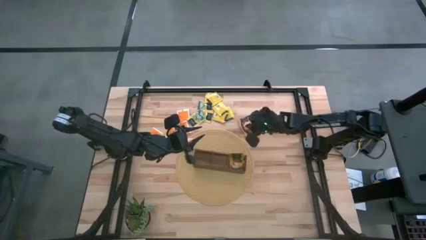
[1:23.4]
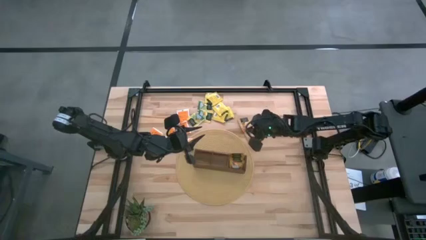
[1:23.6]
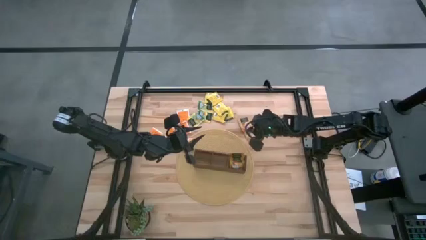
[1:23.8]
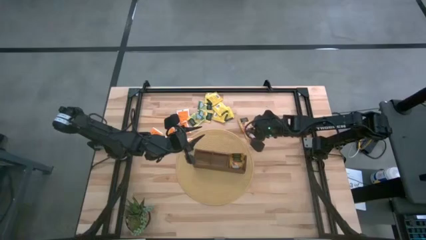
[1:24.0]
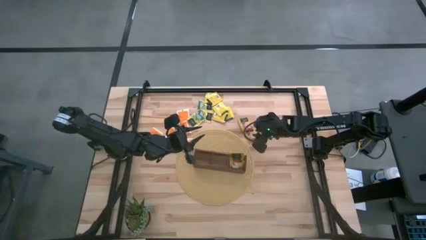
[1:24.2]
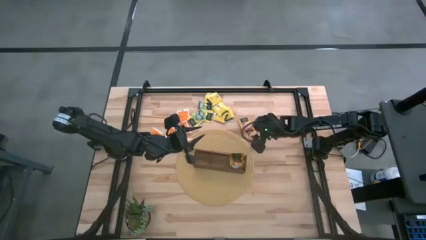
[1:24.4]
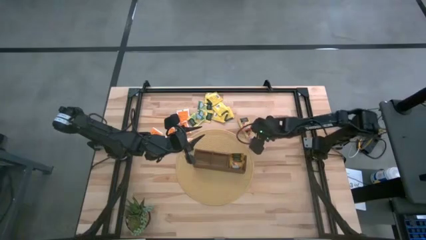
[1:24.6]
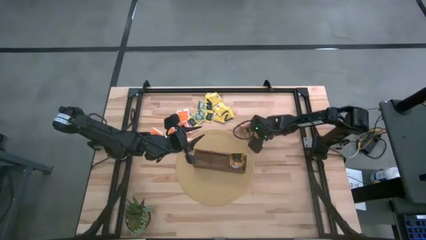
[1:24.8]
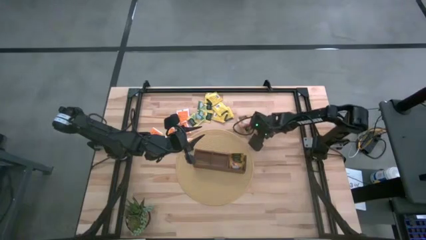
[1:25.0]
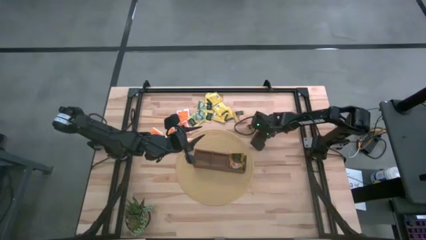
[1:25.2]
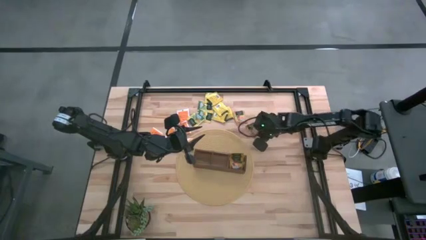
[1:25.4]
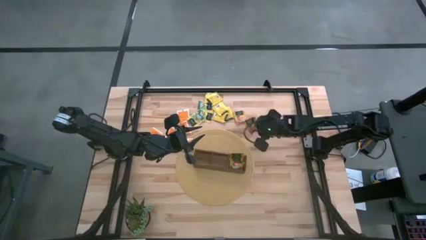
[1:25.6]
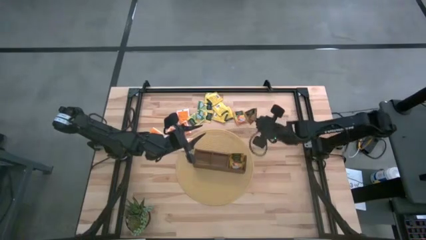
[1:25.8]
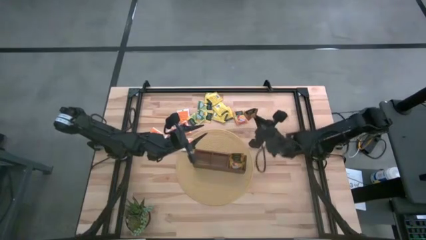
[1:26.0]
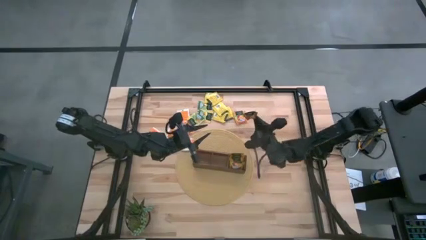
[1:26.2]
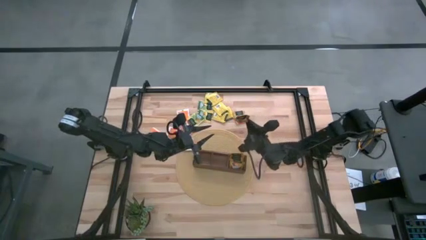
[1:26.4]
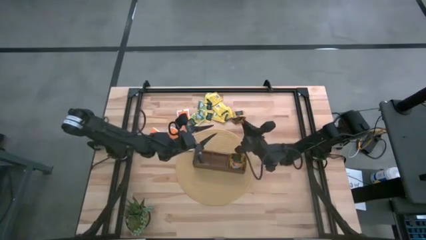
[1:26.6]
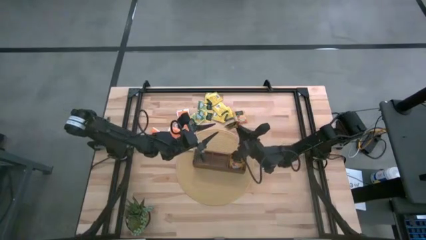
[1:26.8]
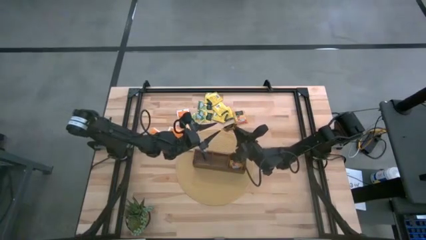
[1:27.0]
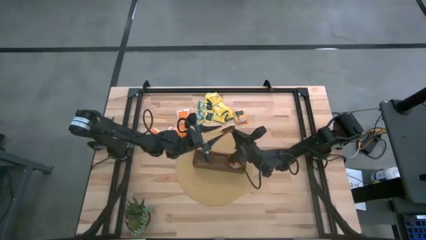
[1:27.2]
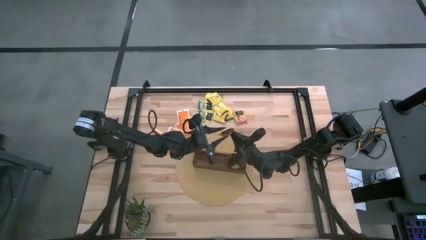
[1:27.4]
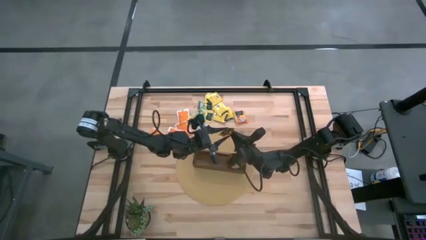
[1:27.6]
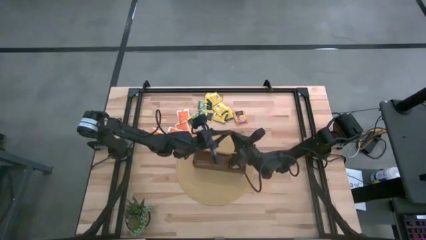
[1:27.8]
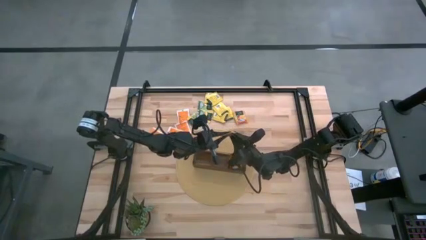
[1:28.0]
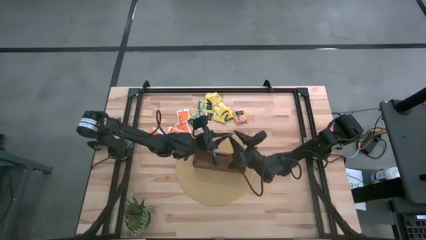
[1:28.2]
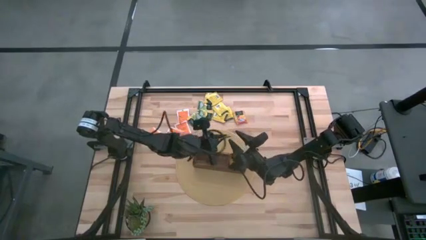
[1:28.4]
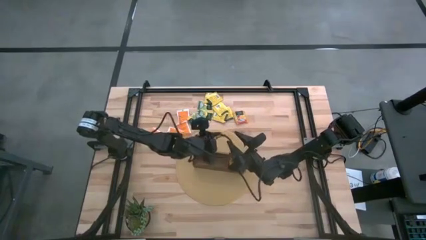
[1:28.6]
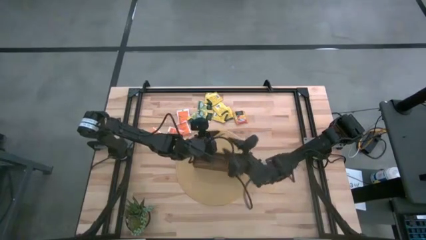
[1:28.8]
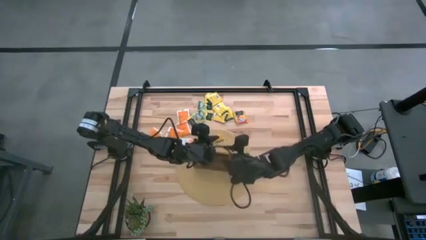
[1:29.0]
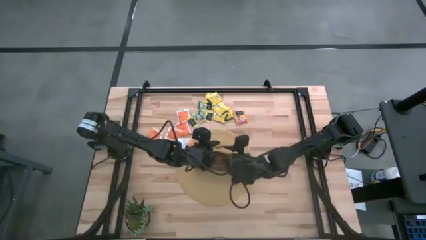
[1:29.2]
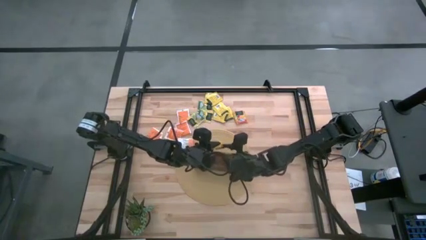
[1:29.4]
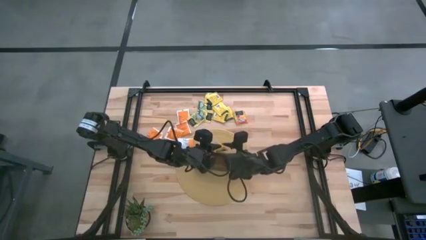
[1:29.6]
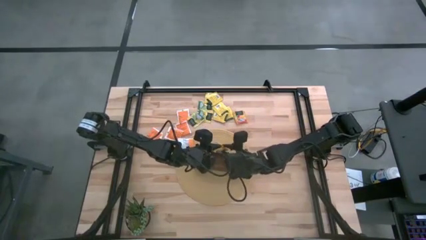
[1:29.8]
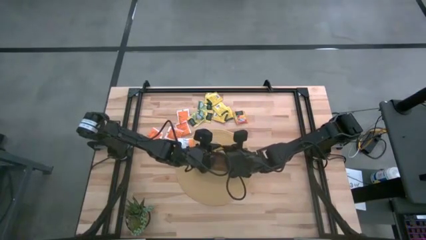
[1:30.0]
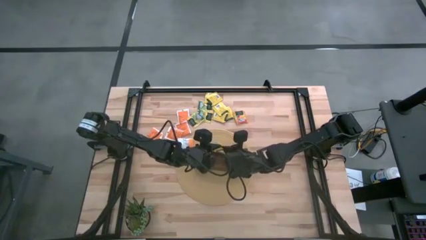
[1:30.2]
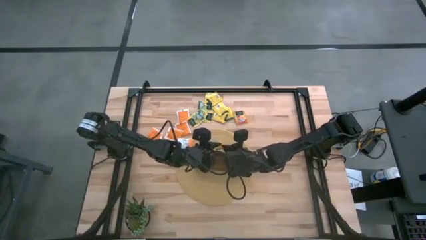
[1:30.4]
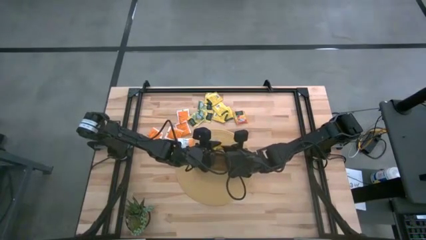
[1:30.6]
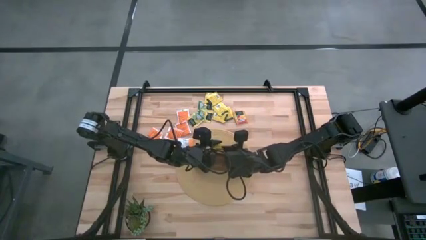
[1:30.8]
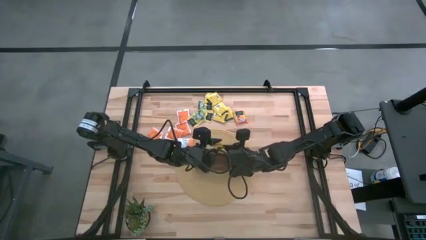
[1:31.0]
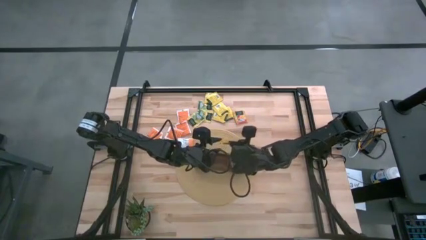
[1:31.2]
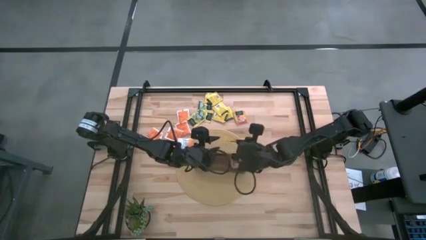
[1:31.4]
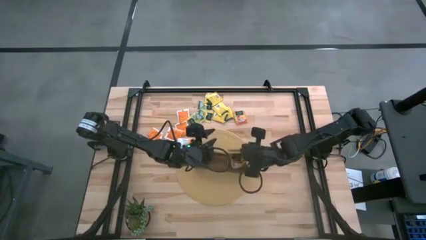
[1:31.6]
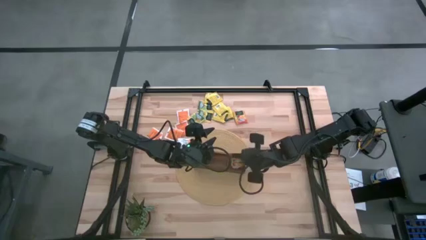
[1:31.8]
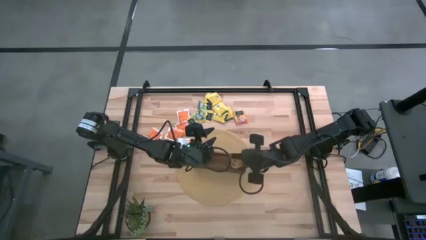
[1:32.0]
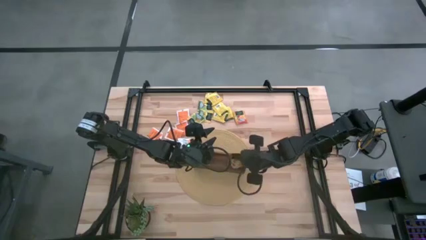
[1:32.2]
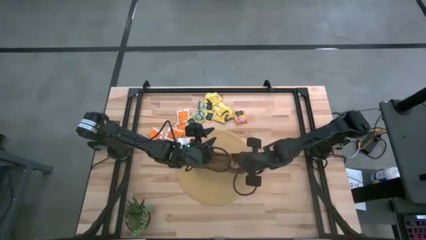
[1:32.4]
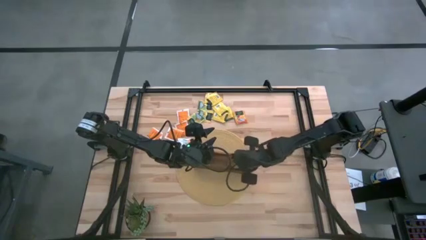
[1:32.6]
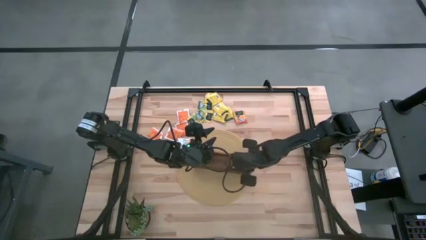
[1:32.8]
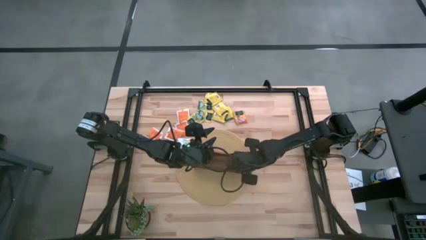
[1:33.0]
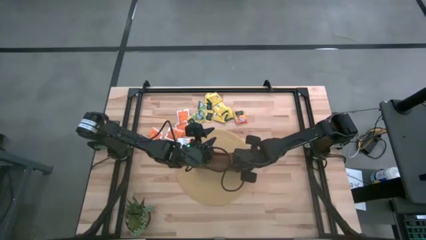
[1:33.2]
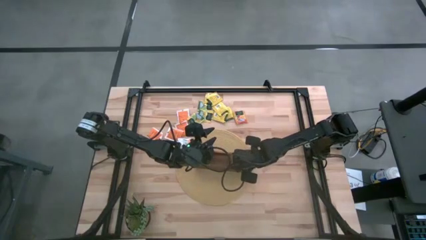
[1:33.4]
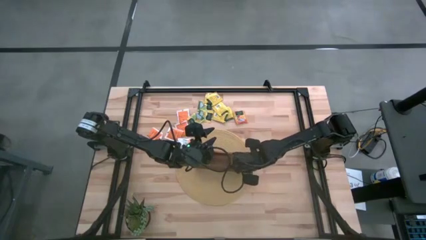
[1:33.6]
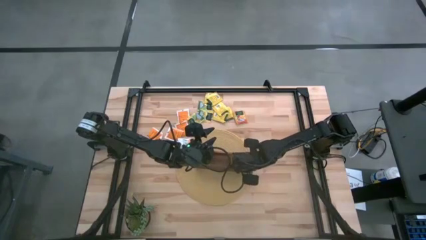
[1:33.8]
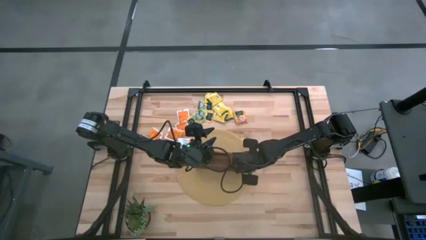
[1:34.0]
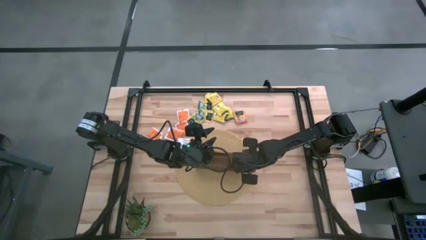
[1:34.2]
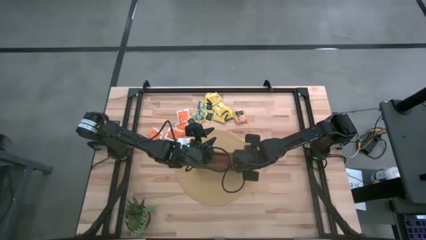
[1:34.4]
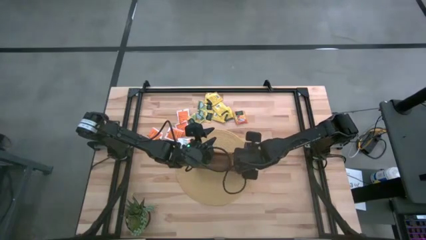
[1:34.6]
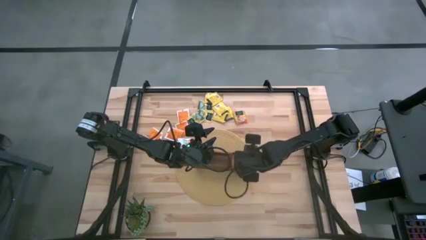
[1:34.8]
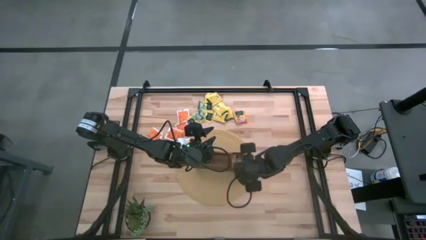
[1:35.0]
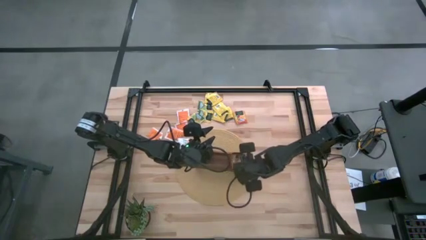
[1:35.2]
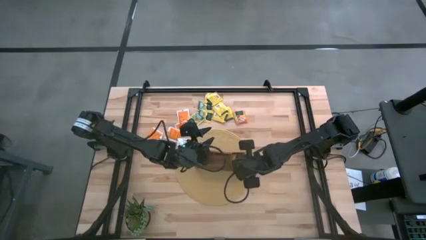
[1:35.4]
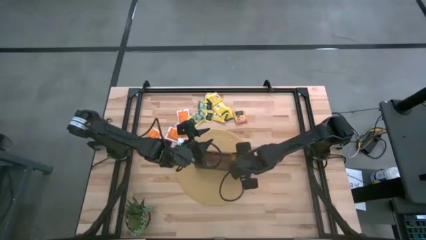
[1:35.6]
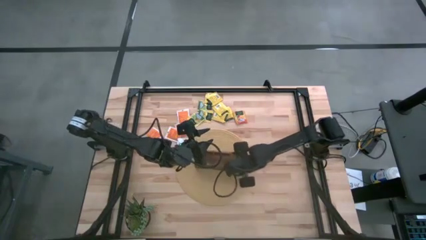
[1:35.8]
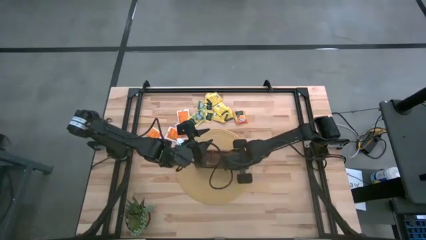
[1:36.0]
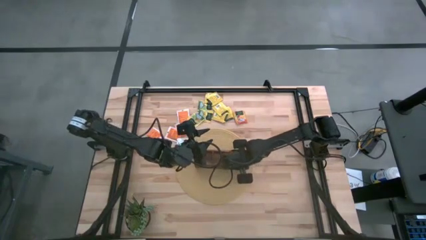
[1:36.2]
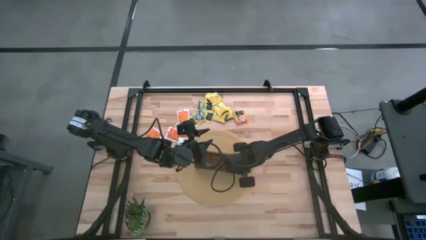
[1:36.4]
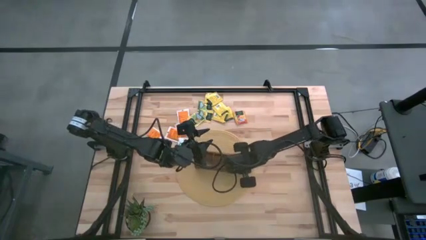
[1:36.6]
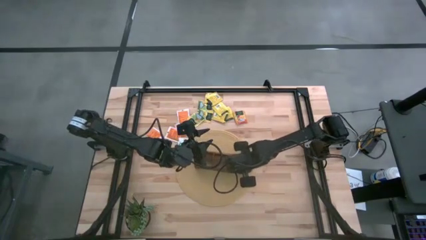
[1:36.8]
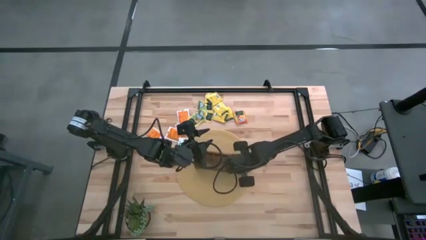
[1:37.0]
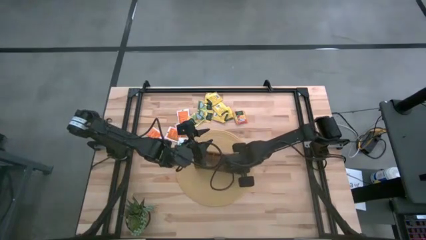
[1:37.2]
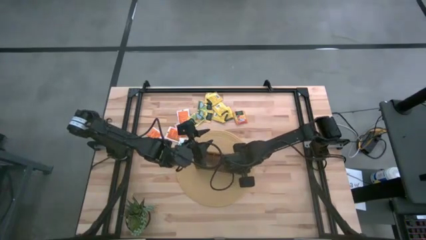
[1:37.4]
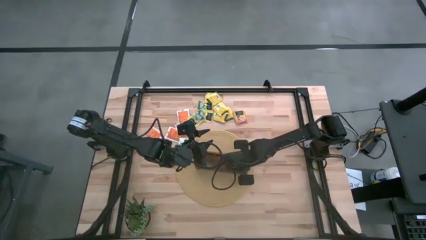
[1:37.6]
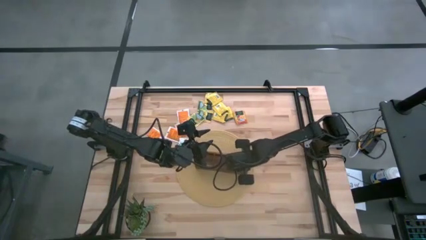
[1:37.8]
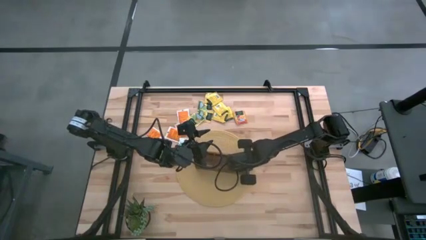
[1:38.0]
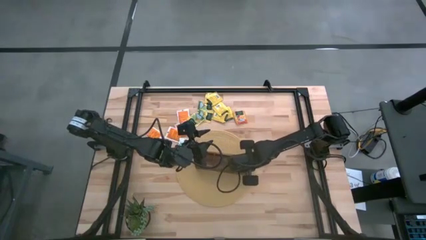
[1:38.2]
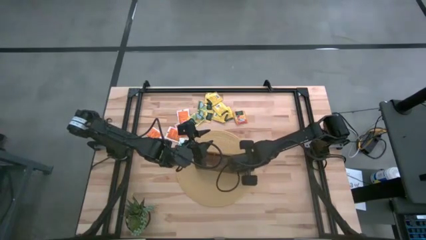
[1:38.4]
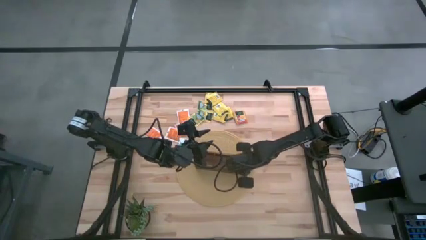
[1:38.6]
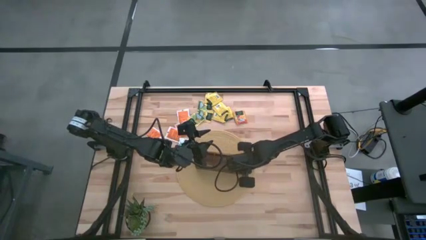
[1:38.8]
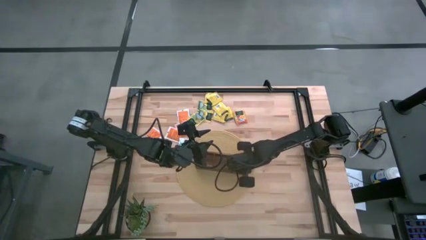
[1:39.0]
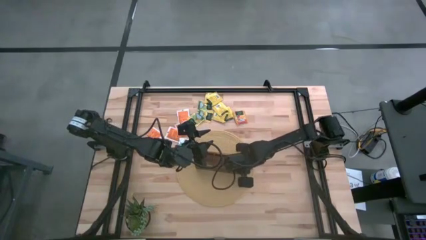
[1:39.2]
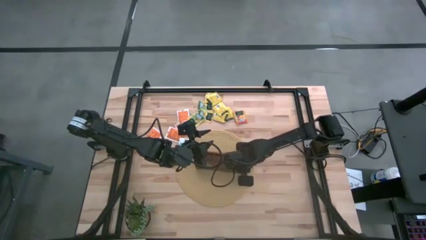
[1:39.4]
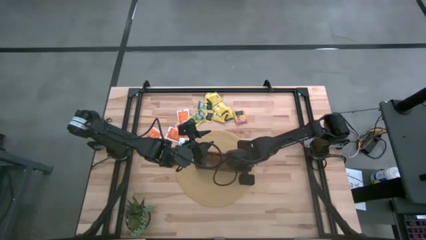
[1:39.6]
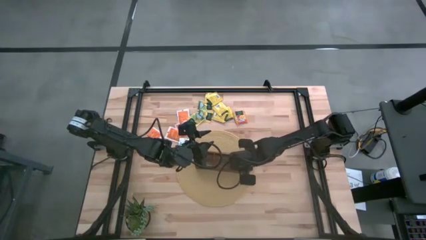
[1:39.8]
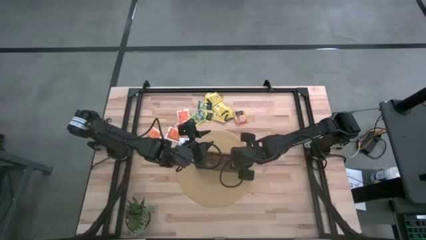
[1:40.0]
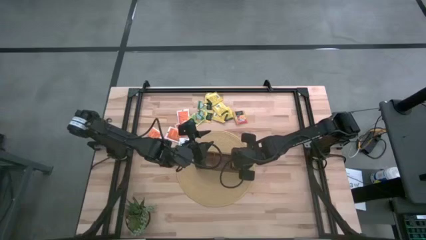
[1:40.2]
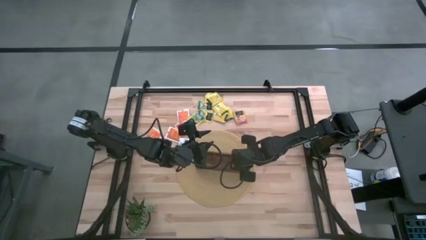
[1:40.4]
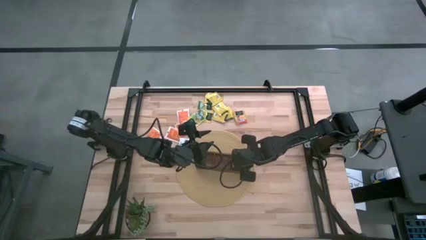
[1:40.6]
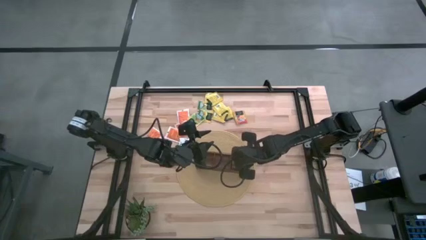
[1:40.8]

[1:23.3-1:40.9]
Task: Pick & Place Tea
Put the orange and green tea bag into the wooden organizer
